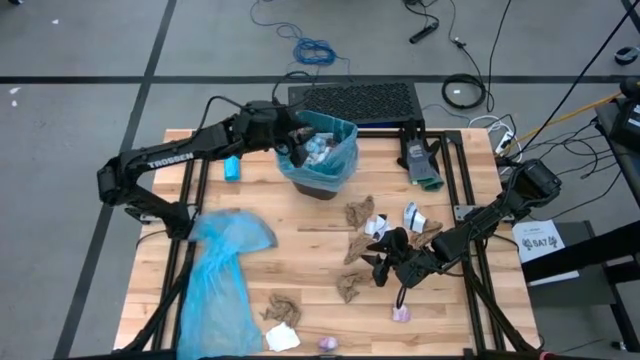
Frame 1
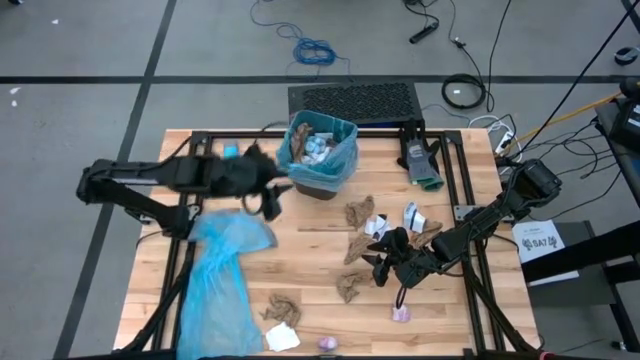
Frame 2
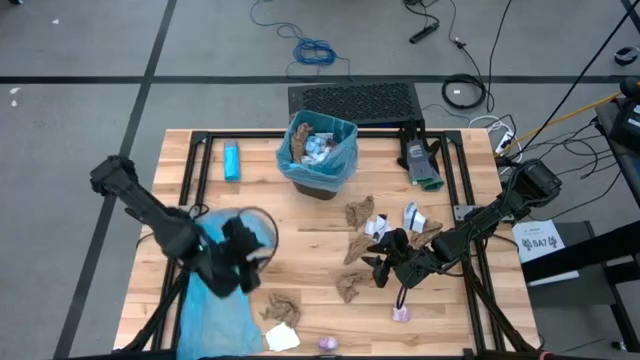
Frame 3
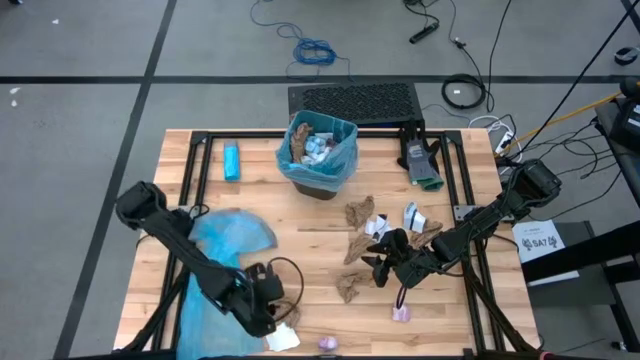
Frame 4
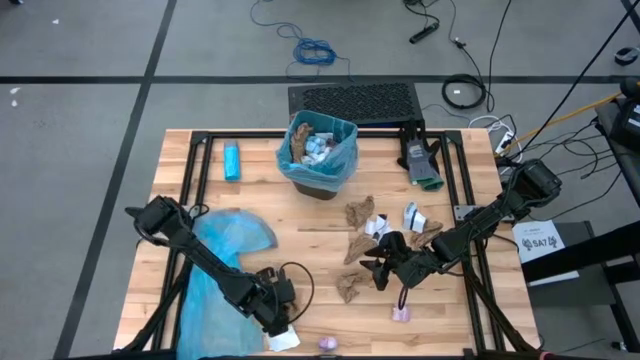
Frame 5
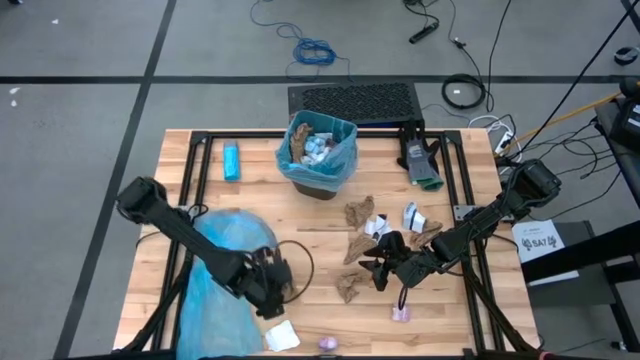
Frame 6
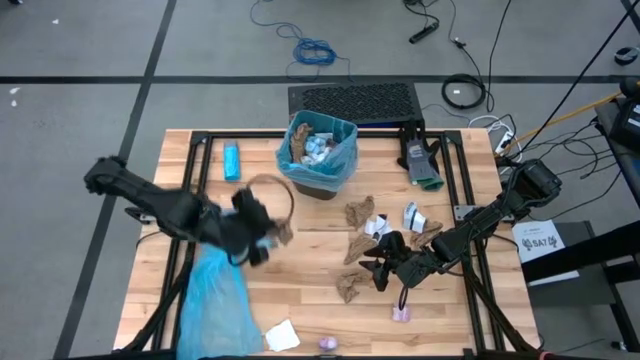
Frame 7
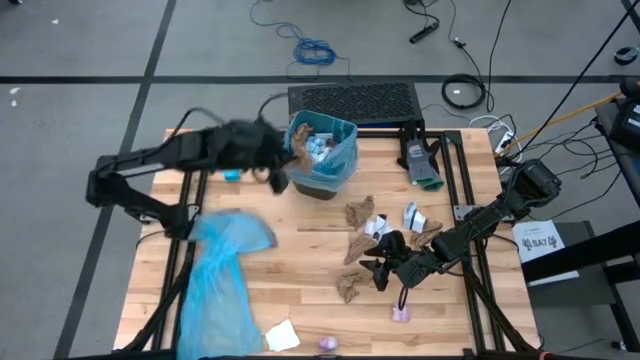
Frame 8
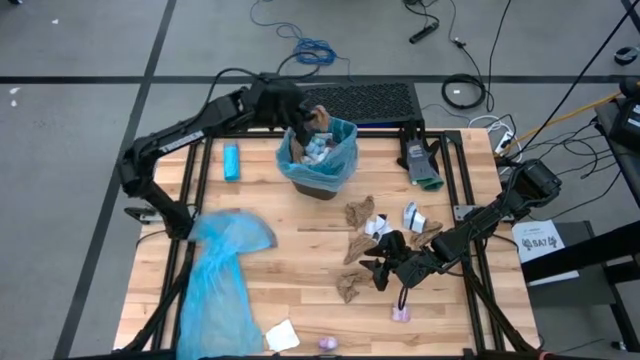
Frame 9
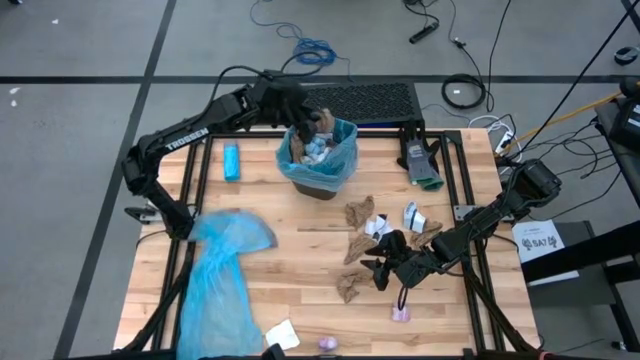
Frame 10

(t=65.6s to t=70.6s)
Task: place trash/remove bag and relplace
Put the brown paper into the trash bin

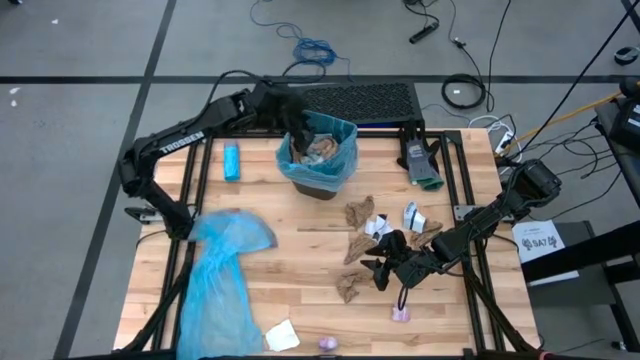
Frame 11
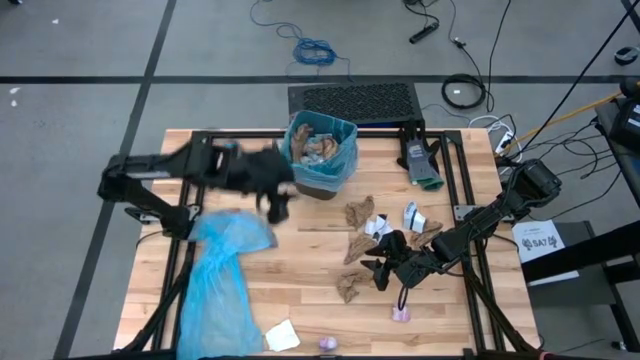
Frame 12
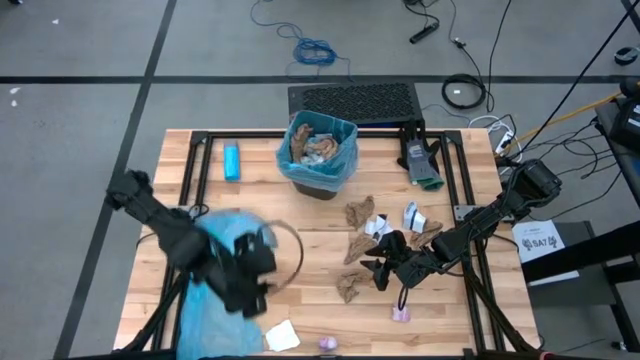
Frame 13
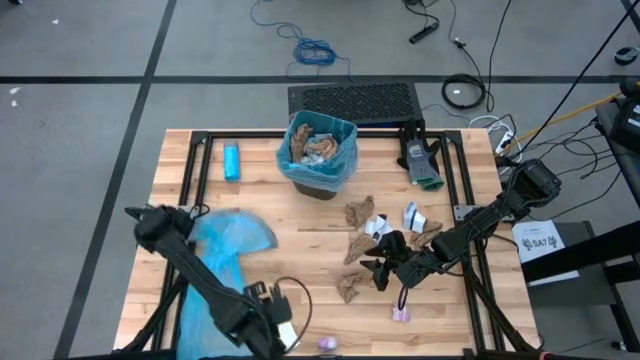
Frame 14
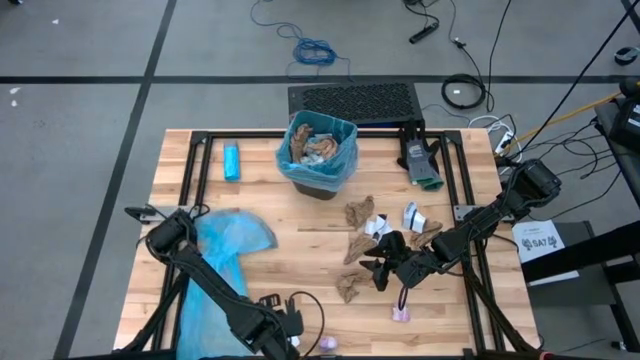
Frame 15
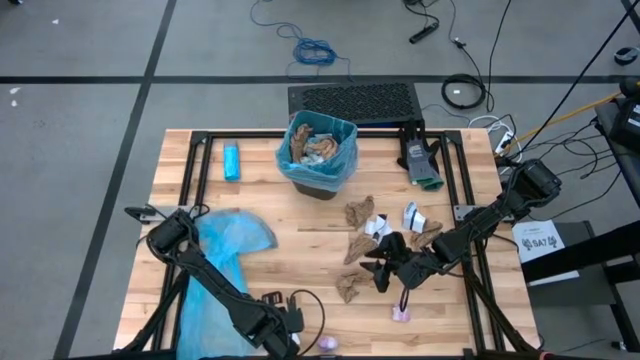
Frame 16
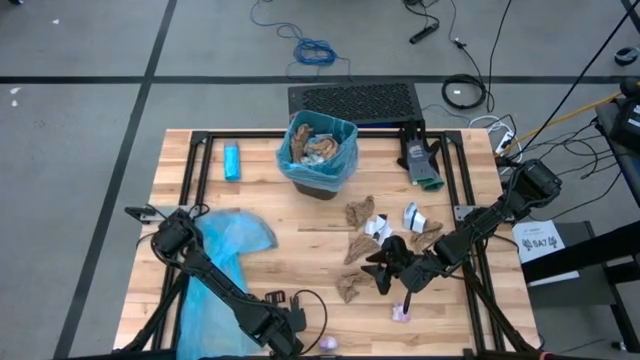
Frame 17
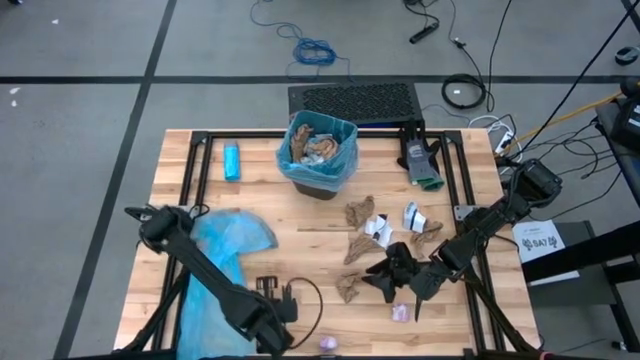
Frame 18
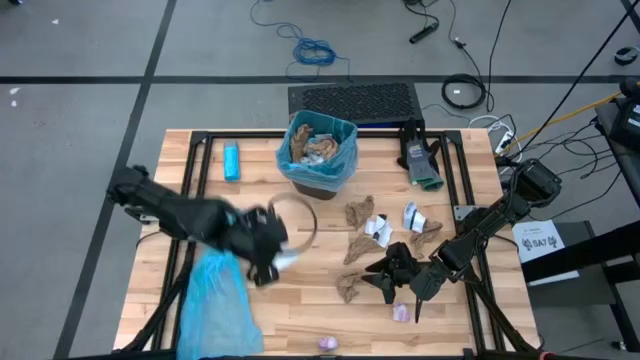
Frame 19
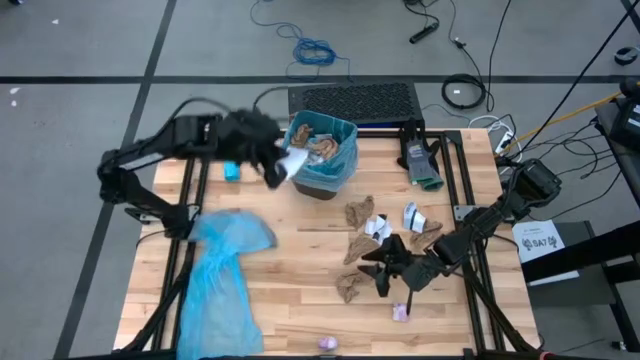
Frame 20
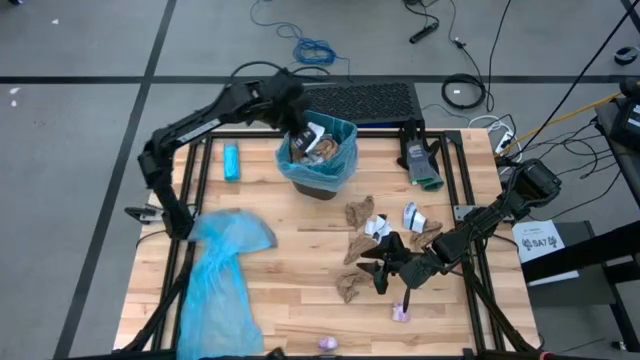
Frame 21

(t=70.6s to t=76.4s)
Put the white paper into the trash bin

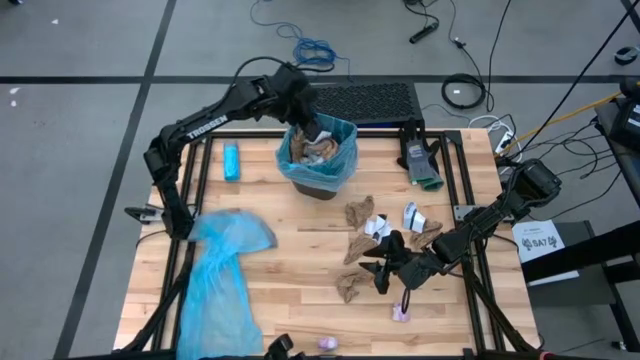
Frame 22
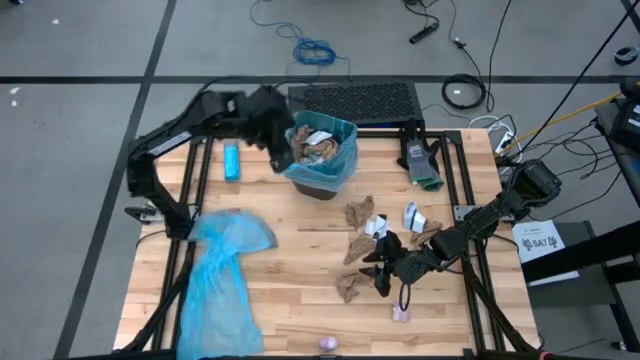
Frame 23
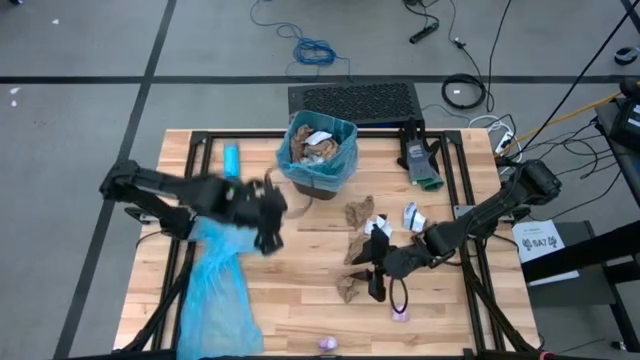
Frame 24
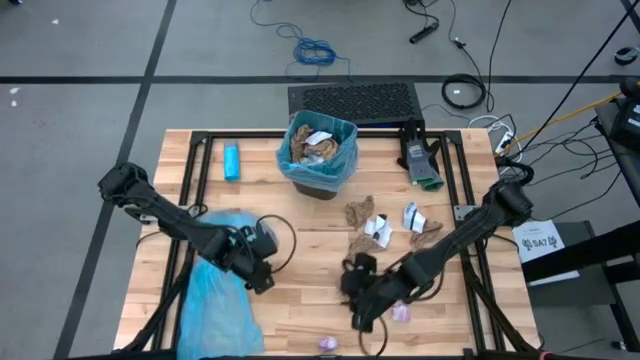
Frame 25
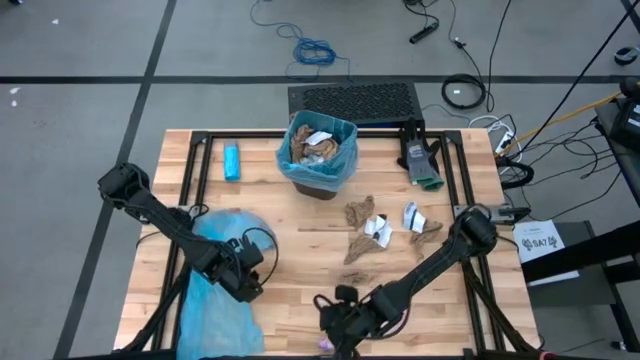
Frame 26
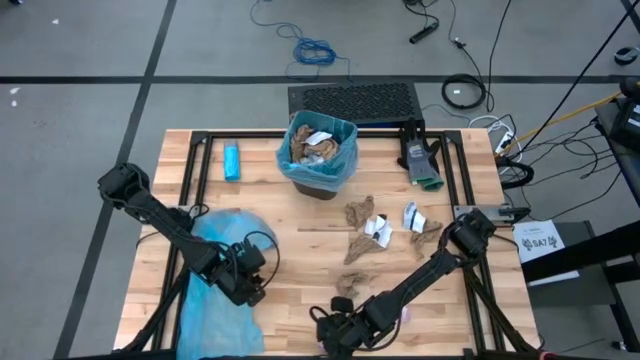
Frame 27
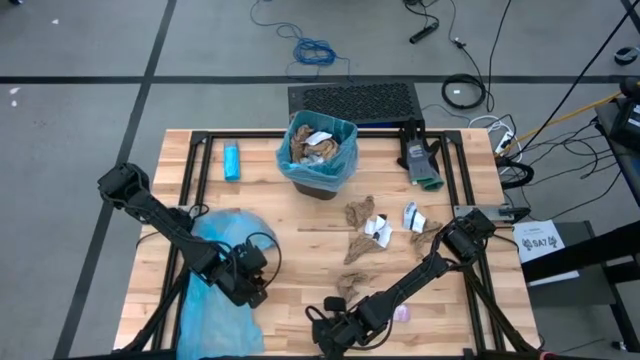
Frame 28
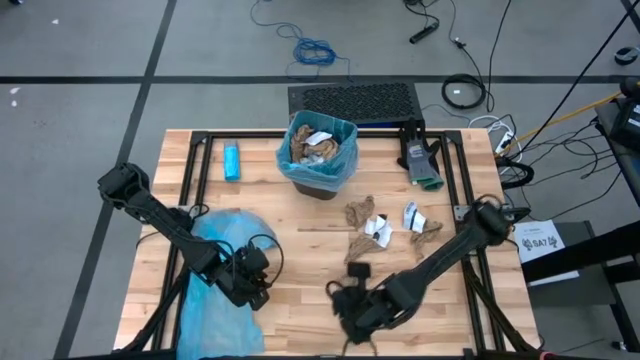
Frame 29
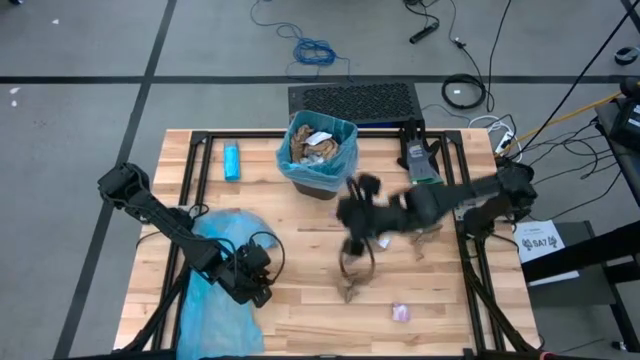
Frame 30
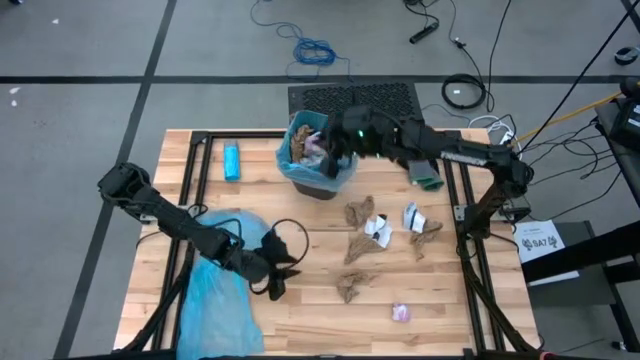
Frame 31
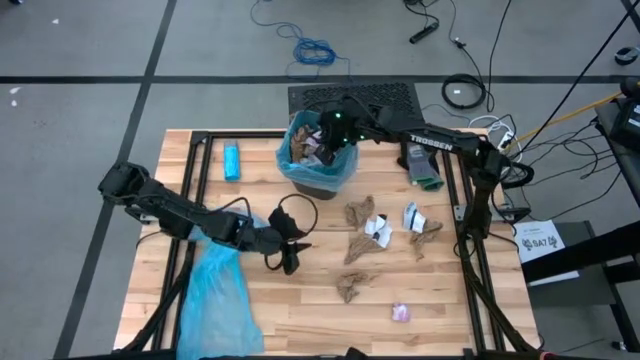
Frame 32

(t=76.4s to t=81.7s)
Put the pink plastic into the trash bin

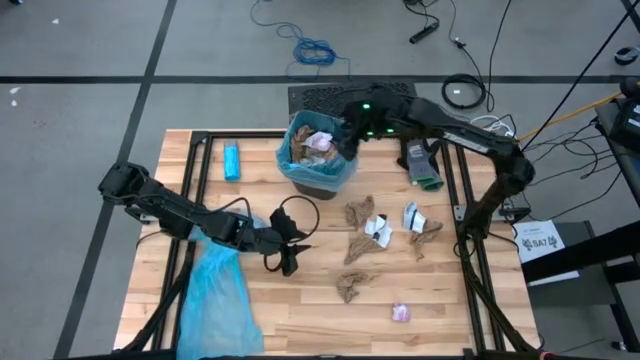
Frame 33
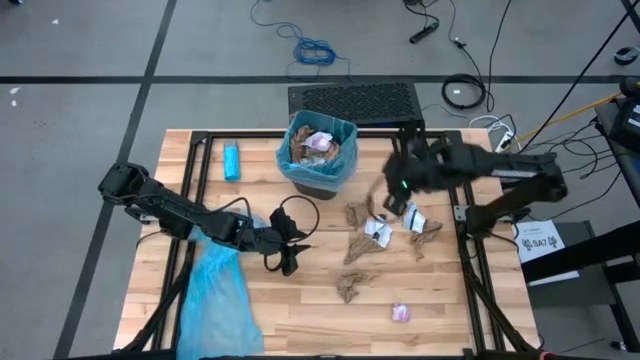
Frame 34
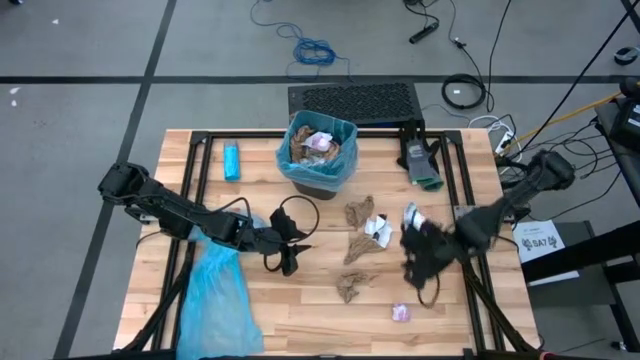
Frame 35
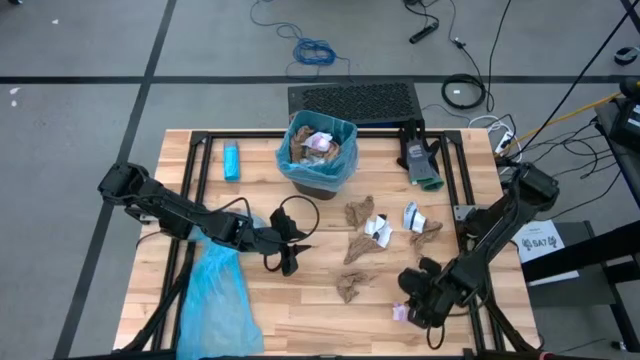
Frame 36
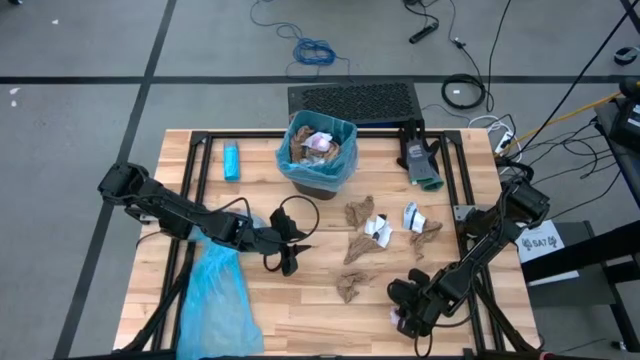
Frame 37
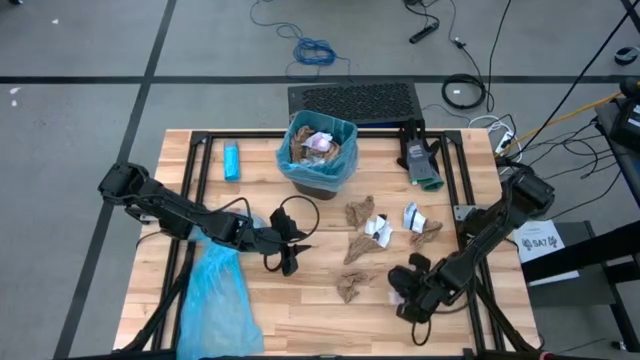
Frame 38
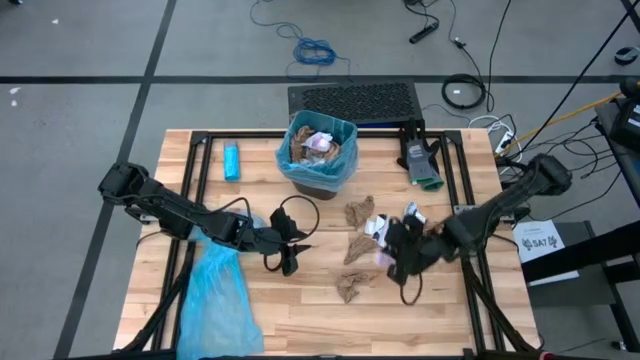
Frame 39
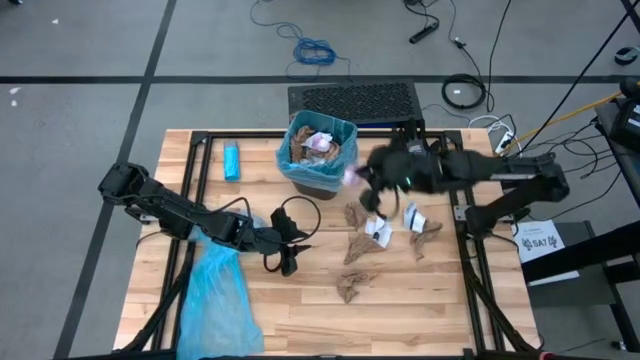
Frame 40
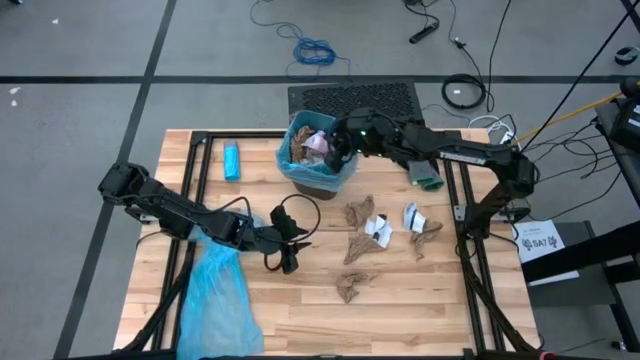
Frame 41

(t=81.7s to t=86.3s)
Put the pink plastic into the trash bin
